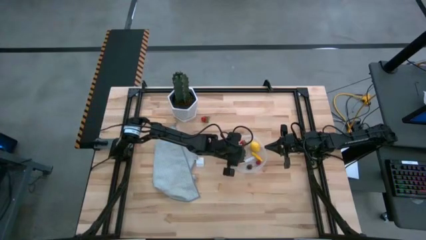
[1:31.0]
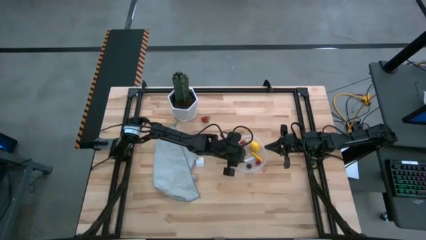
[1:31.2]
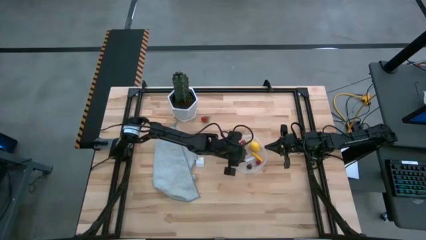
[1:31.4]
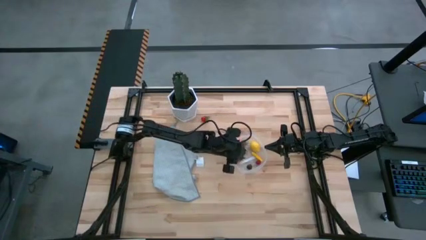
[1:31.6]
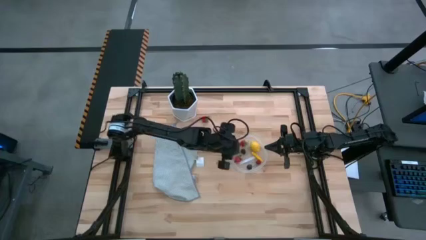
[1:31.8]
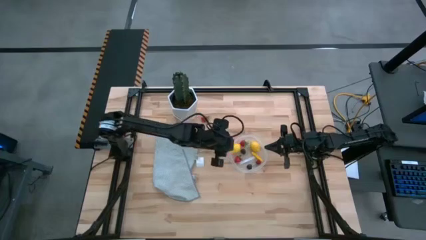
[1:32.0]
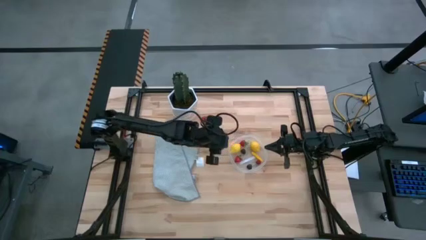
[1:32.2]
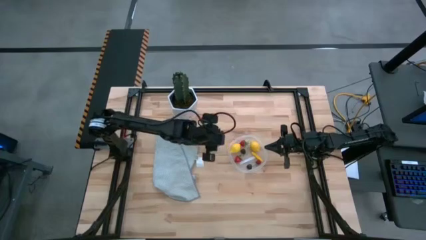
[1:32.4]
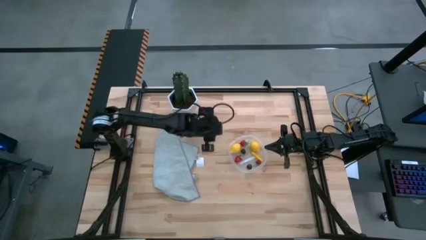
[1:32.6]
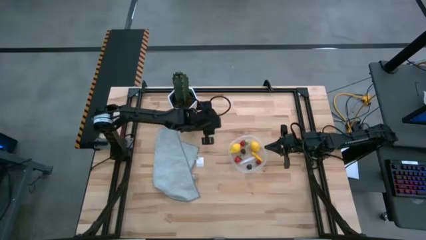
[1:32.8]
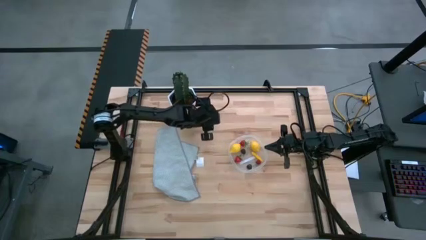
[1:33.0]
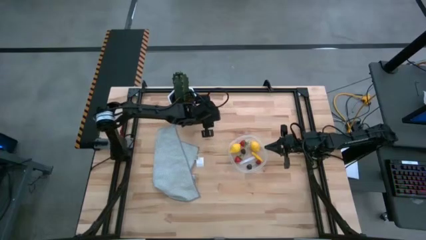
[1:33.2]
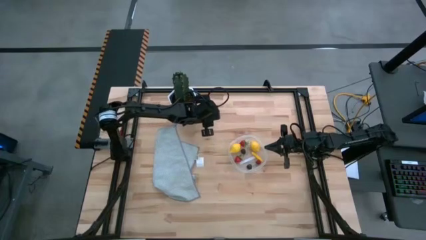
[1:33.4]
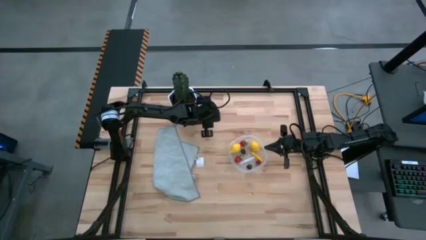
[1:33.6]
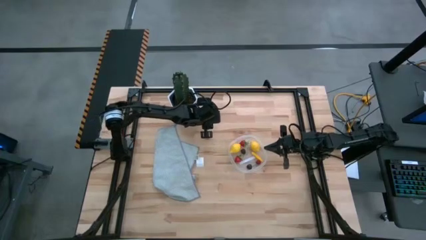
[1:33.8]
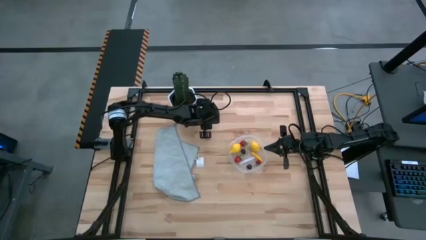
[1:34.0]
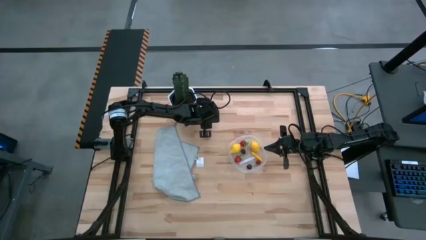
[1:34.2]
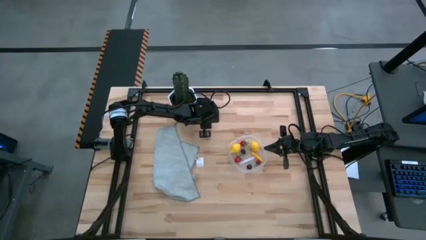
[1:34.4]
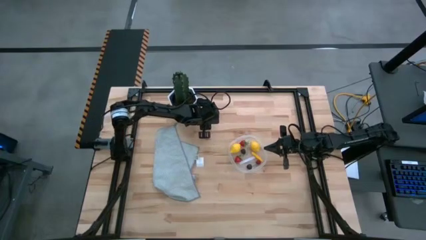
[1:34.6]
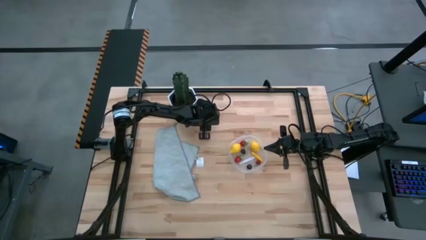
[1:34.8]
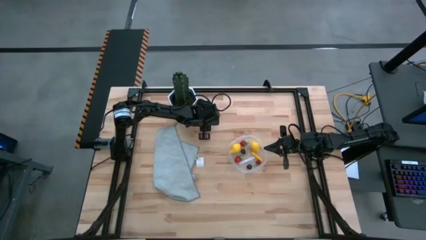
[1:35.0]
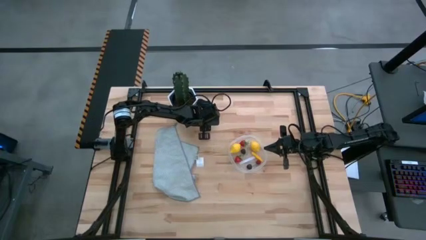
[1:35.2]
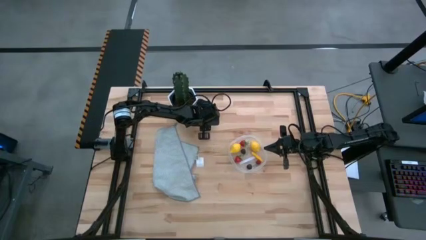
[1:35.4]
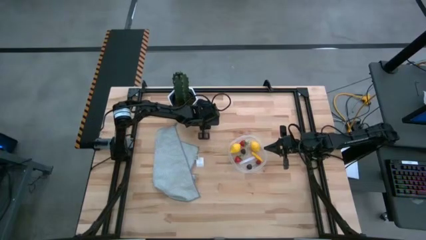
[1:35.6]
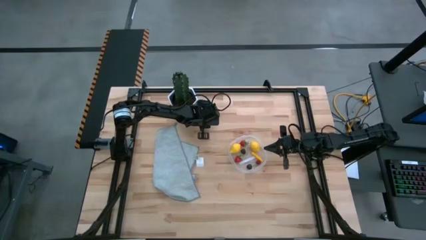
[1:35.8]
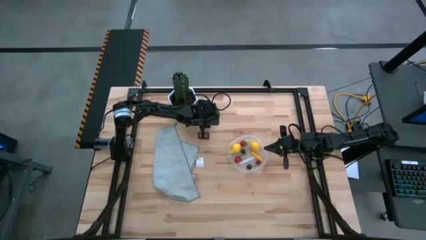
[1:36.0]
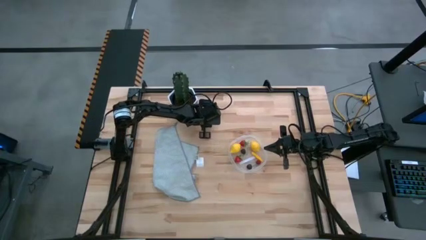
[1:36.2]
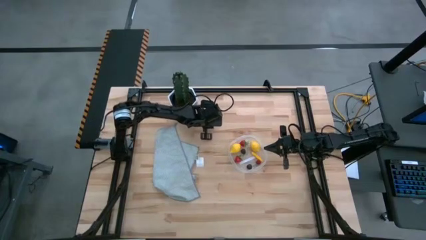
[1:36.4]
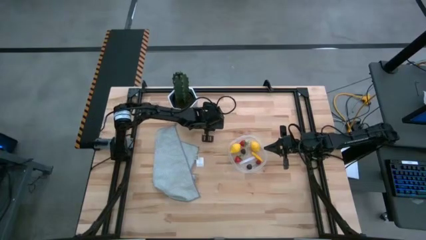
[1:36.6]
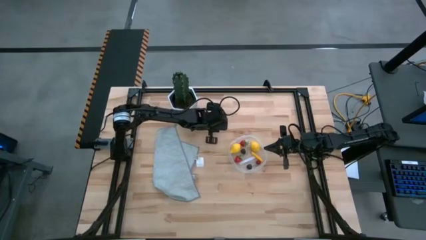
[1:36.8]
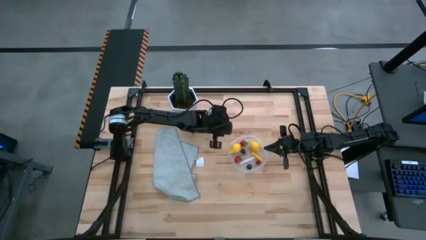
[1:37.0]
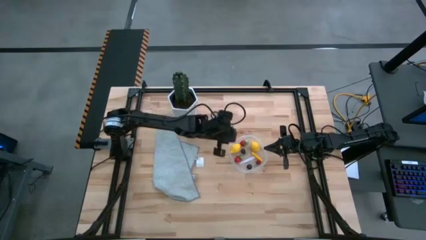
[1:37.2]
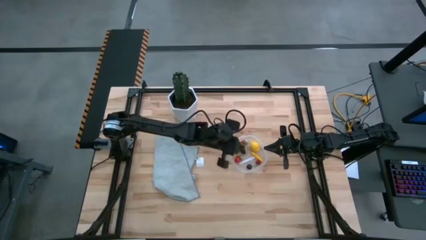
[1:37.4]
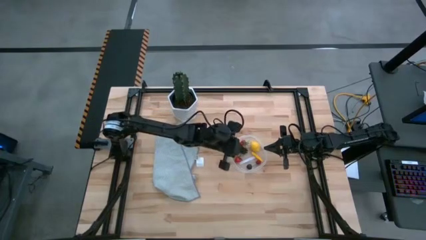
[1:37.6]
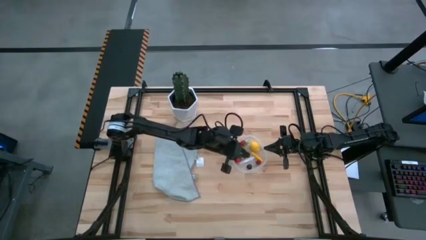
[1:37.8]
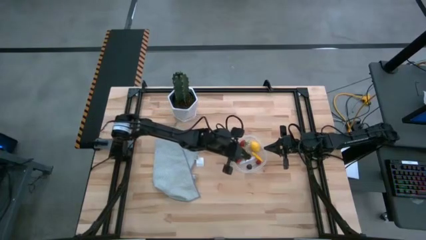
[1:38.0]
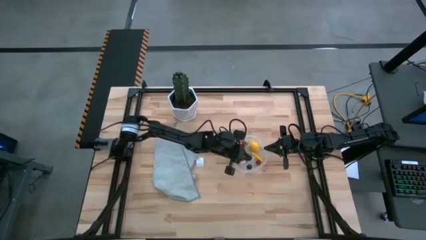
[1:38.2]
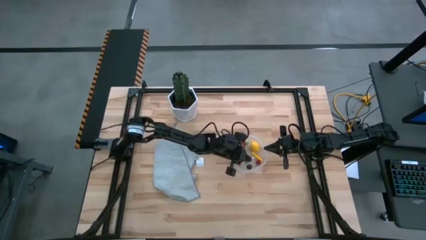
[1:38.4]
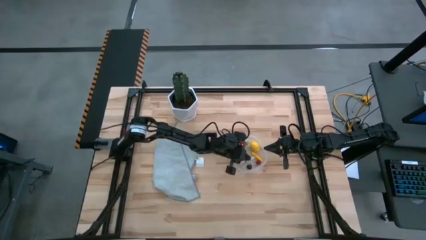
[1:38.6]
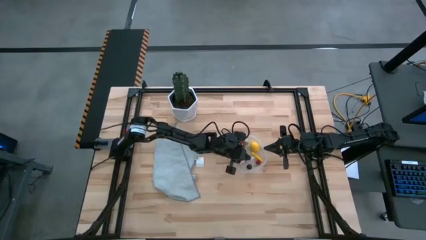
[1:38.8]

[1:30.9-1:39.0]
Task: Pick and placing Produce into tupperware
Put the red strawberry into the transparent container

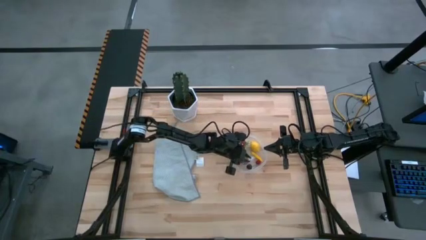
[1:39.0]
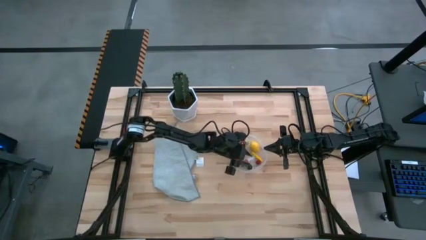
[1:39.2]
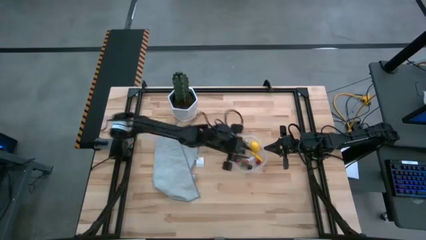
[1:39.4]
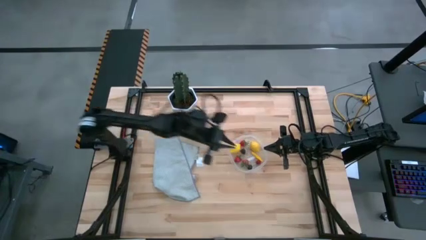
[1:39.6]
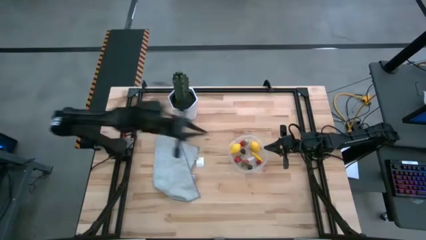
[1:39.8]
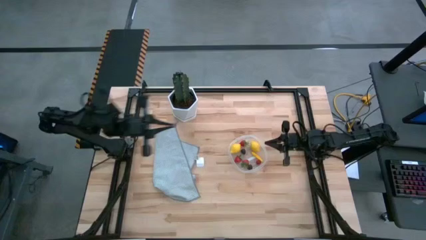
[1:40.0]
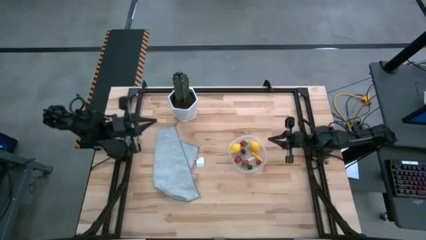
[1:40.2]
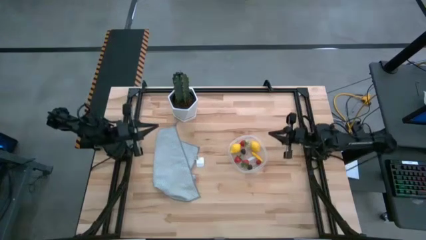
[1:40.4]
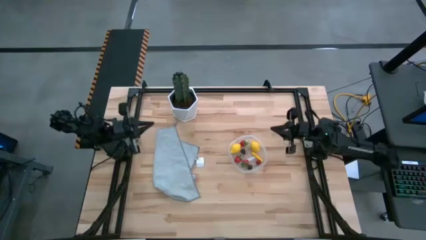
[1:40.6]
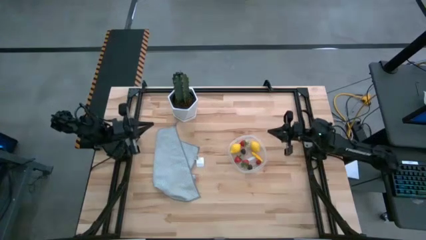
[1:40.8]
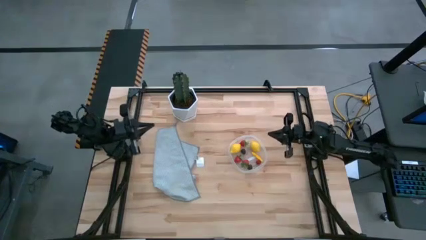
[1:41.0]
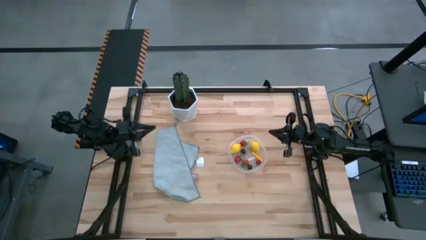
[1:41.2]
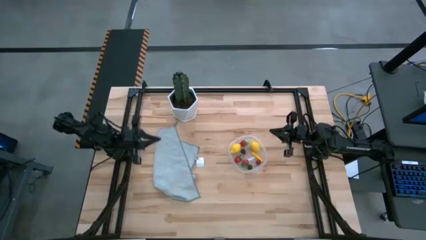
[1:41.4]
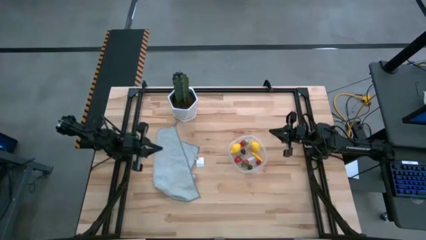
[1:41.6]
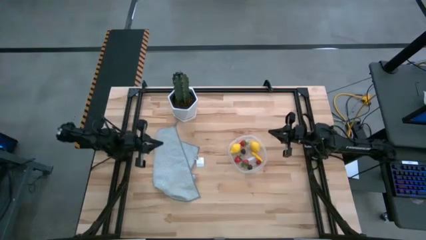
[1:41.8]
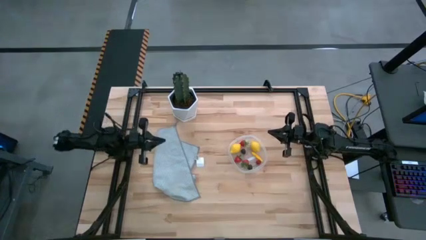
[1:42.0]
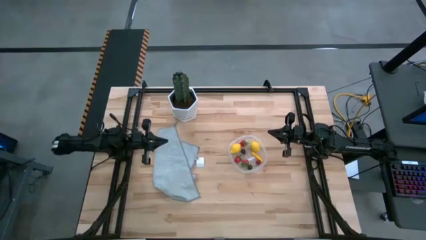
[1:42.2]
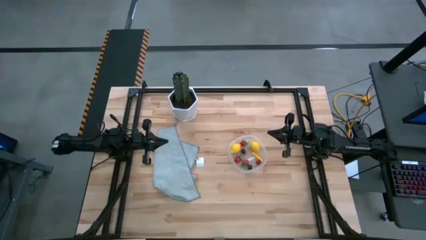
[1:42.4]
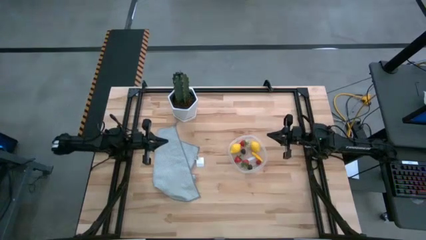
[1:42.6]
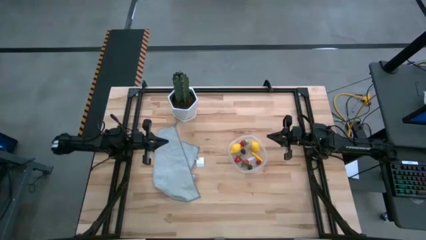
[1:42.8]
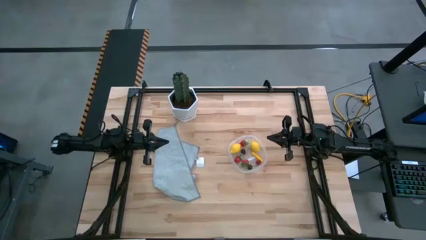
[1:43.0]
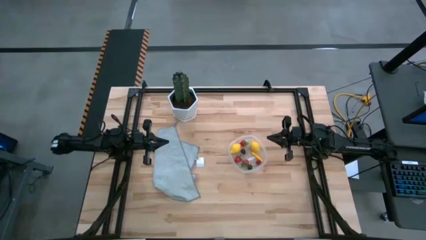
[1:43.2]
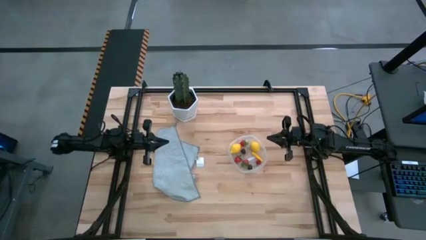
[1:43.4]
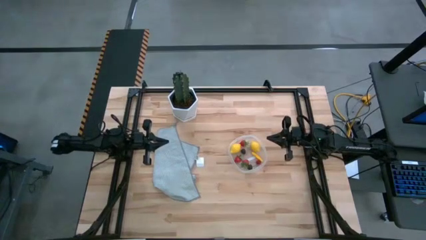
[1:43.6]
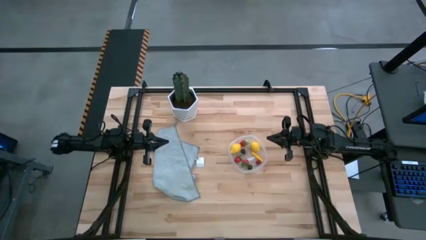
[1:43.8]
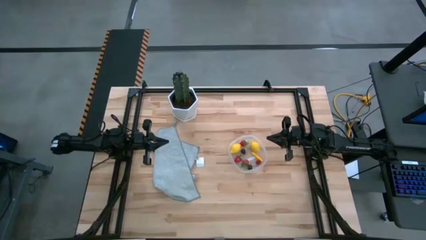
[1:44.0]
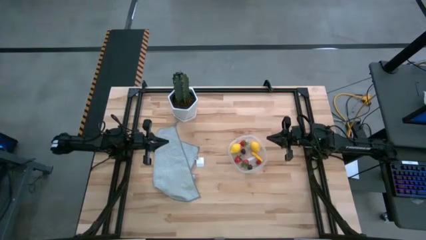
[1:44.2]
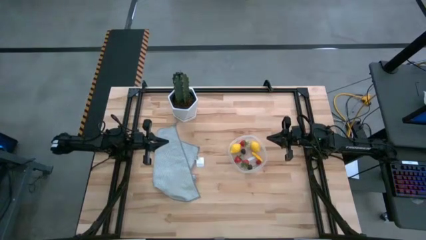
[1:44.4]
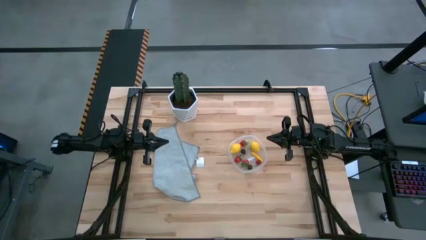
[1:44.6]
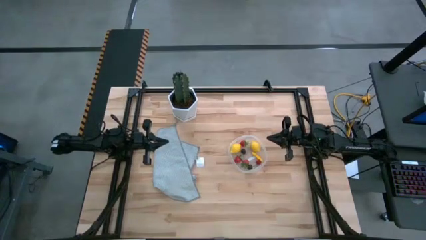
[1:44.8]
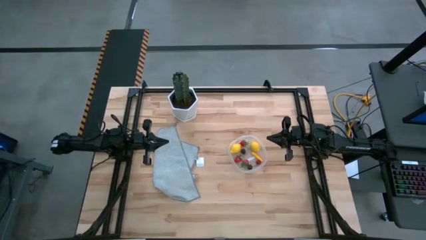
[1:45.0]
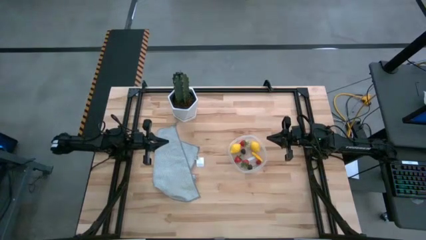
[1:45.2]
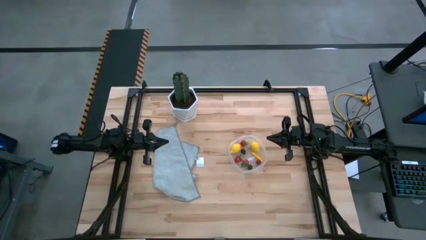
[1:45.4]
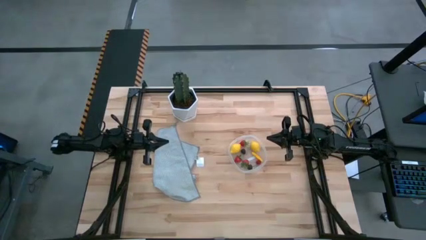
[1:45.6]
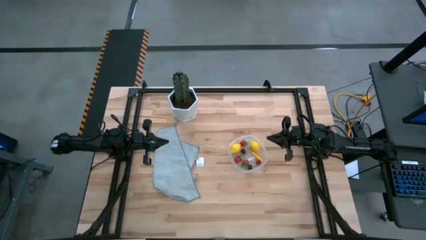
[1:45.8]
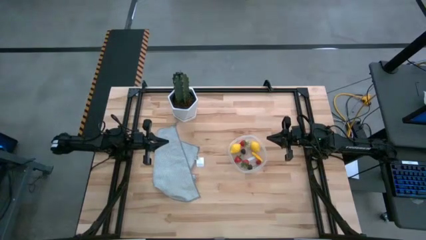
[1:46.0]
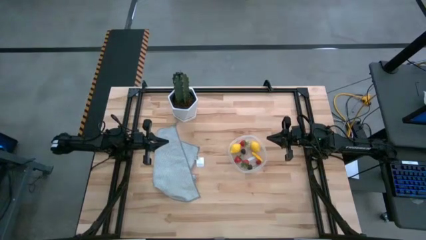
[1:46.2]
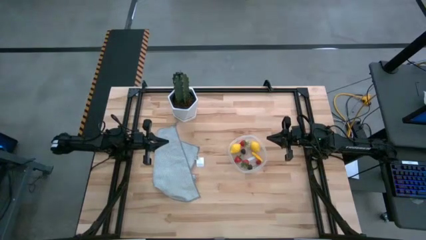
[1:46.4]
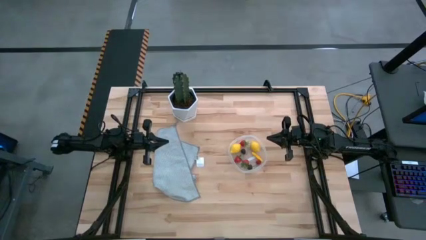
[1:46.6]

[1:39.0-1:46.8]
Return to Home Position

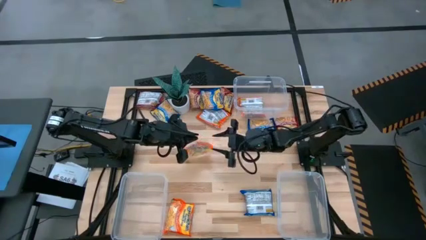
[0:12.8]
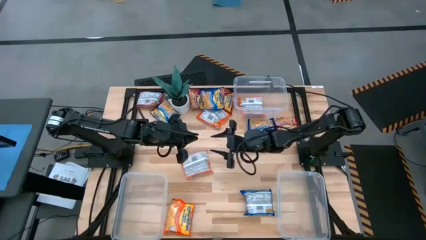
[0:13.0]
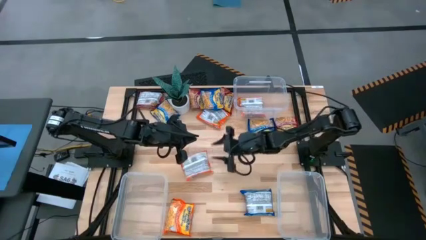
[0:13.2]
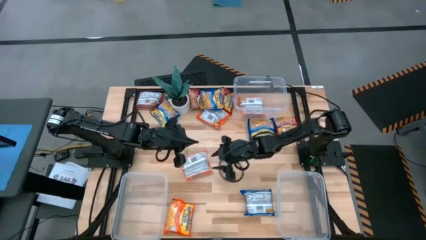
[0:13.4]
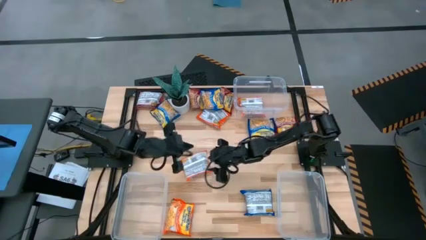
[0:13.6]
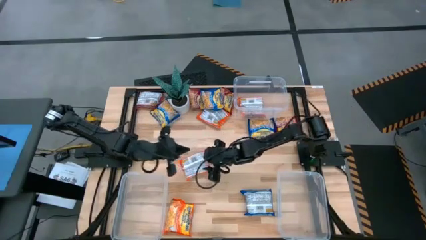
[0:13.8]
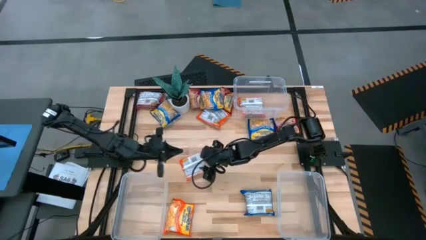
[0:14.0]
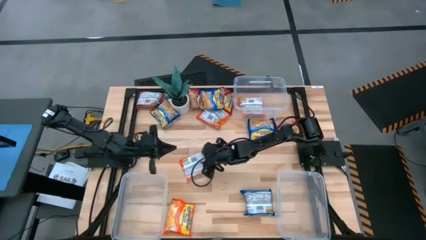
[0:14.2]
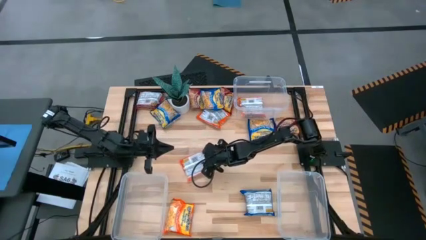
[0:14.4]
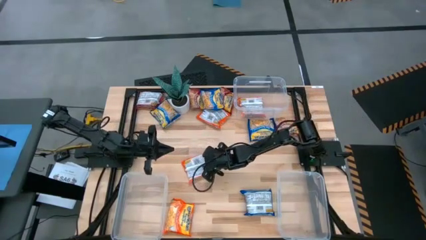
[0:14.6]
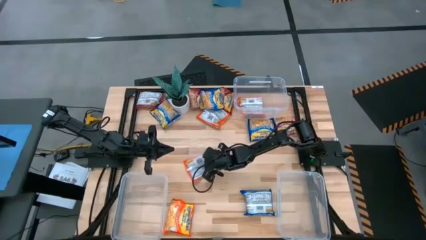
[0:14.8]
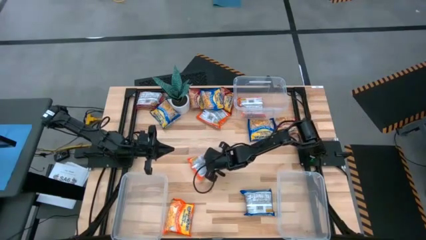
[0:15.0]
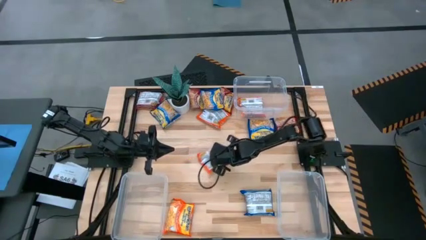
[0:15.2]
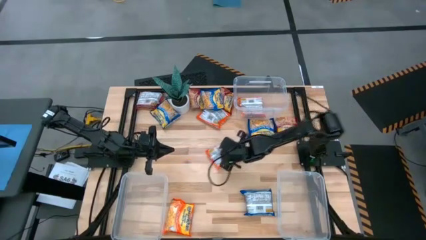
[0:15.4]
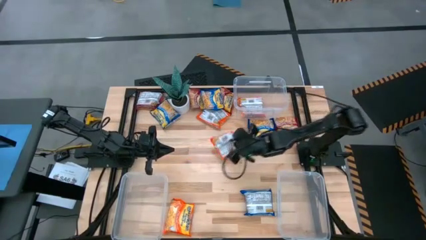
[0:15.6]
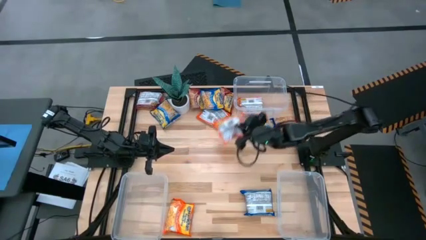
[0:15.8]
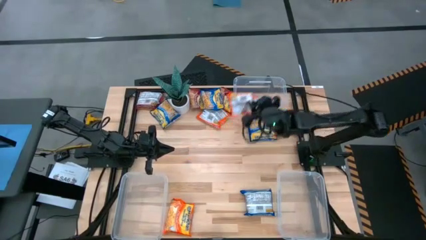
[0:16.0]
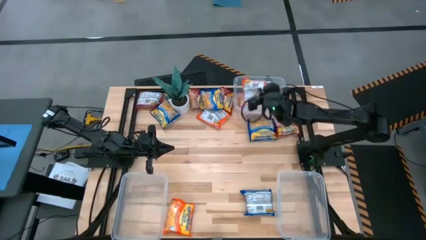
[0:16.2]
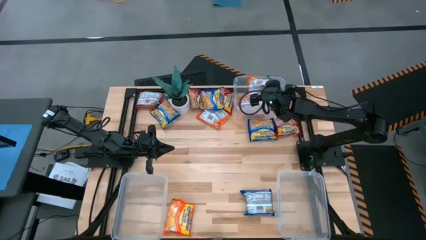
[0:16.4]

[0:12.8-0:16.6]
Task: Sort Maruchan noodles
Put the orange noodle pack into the top transparent bin
